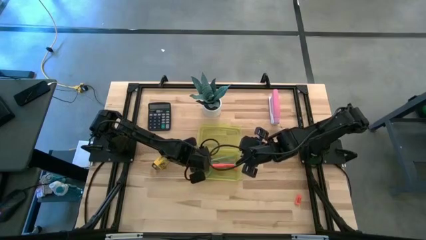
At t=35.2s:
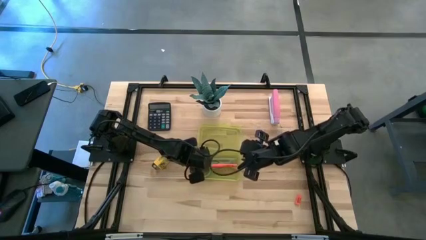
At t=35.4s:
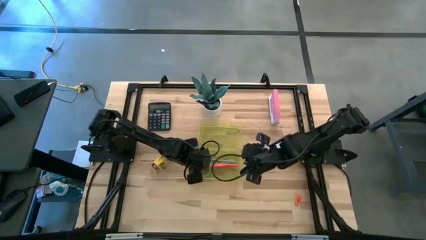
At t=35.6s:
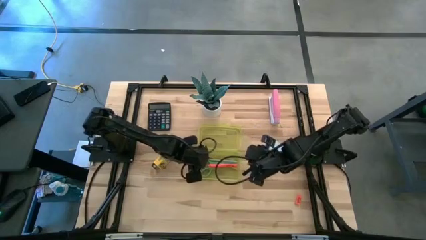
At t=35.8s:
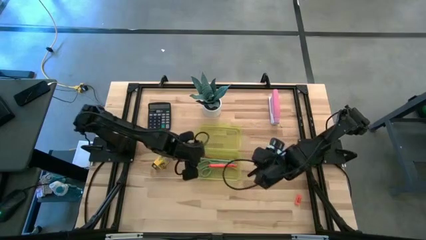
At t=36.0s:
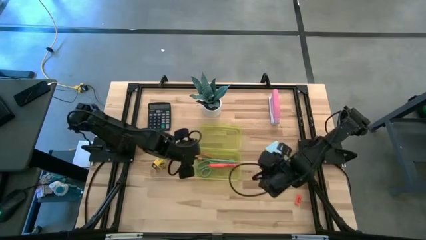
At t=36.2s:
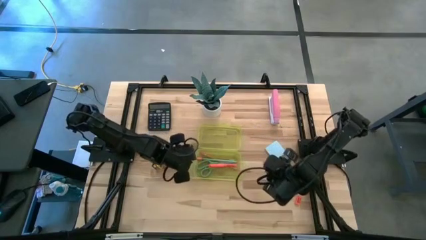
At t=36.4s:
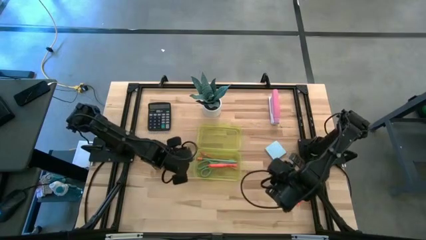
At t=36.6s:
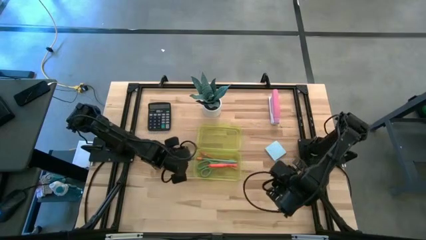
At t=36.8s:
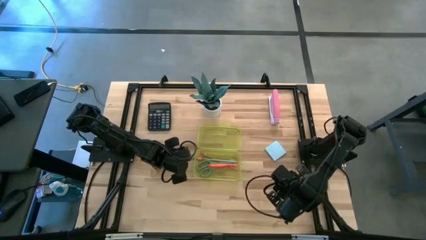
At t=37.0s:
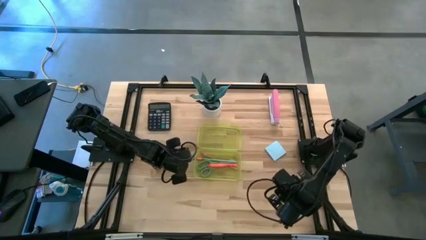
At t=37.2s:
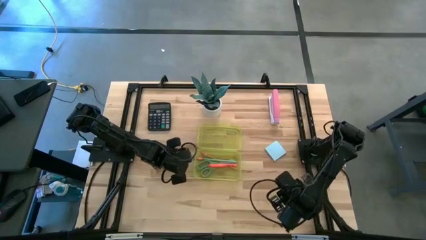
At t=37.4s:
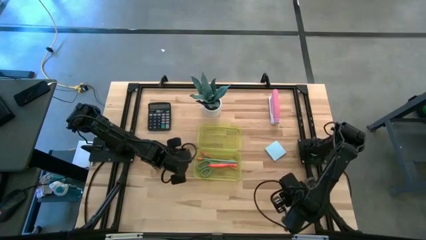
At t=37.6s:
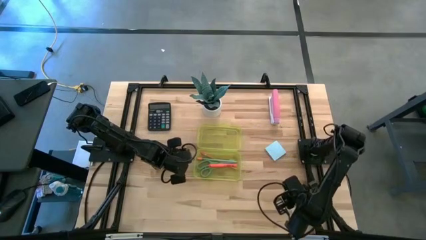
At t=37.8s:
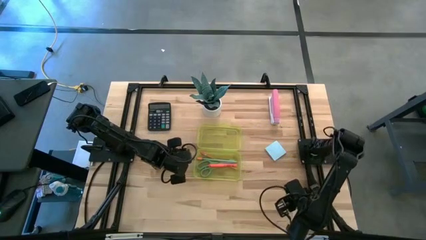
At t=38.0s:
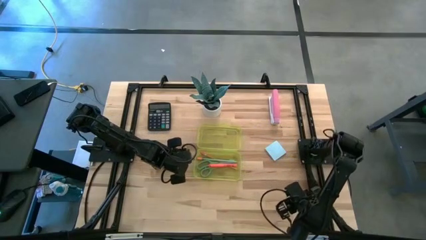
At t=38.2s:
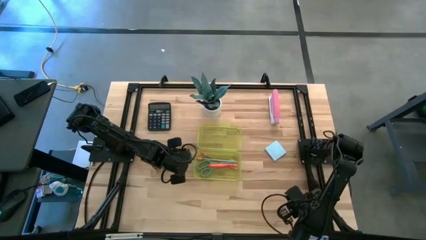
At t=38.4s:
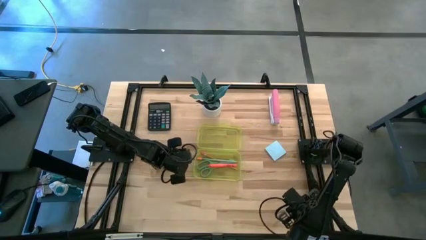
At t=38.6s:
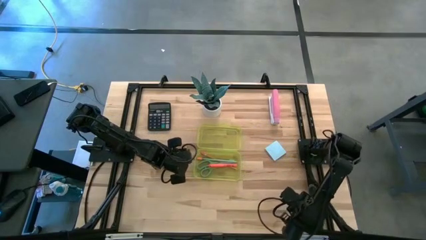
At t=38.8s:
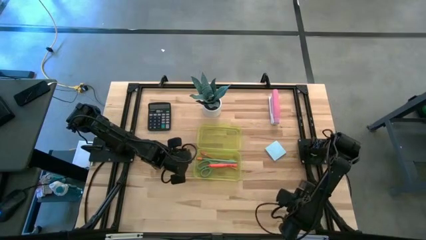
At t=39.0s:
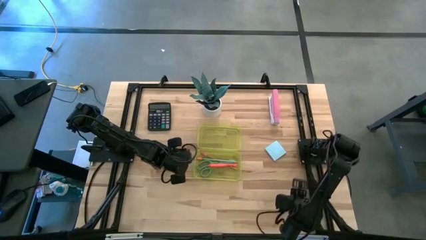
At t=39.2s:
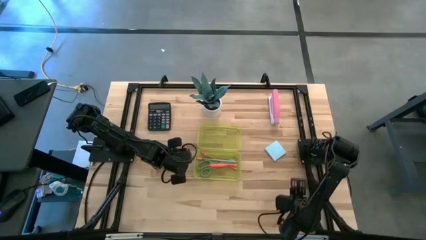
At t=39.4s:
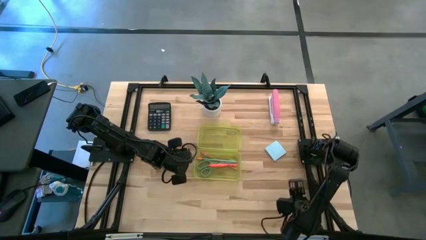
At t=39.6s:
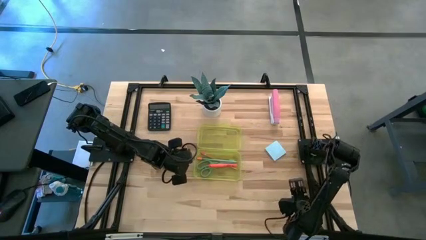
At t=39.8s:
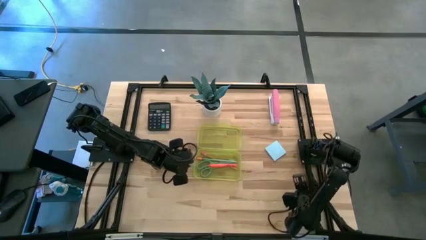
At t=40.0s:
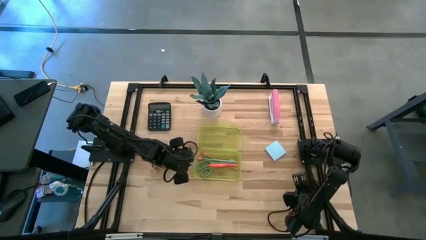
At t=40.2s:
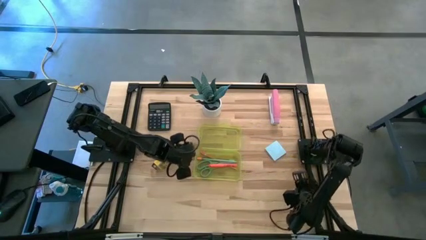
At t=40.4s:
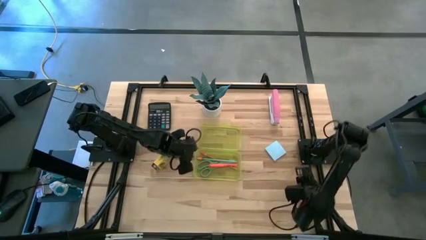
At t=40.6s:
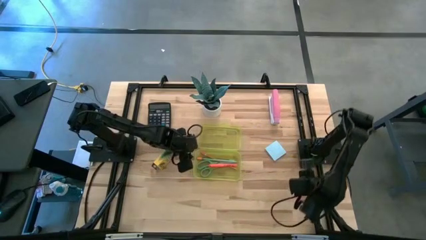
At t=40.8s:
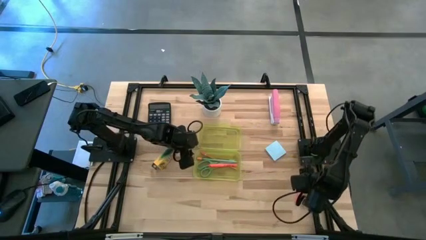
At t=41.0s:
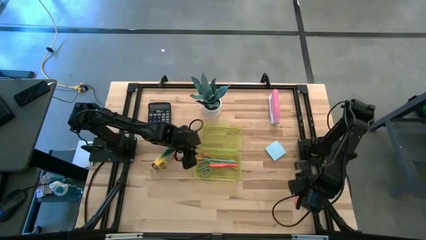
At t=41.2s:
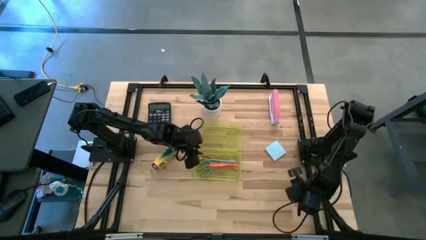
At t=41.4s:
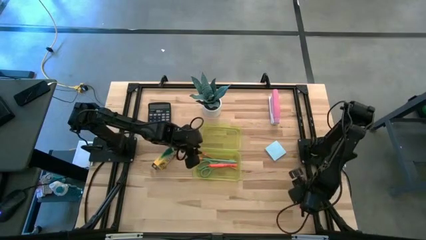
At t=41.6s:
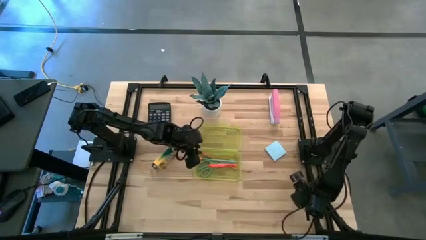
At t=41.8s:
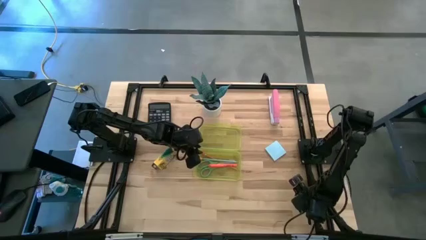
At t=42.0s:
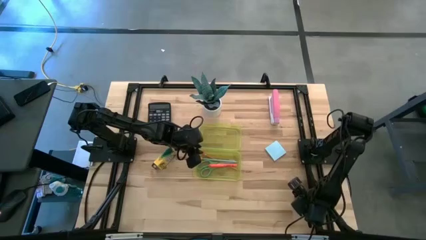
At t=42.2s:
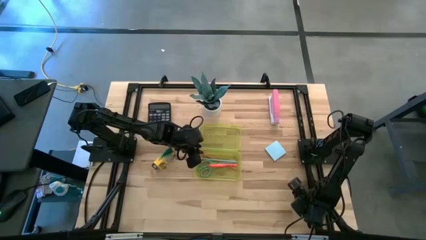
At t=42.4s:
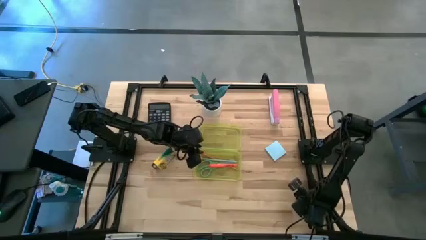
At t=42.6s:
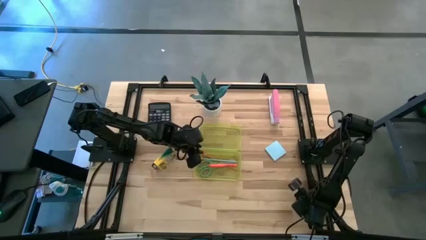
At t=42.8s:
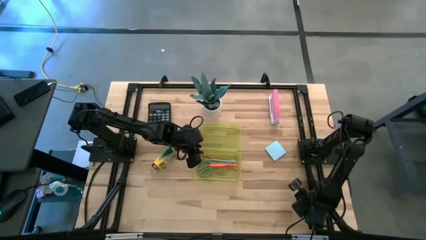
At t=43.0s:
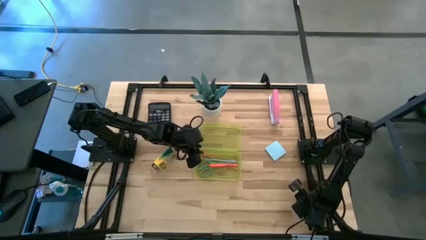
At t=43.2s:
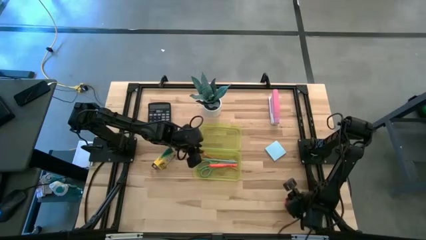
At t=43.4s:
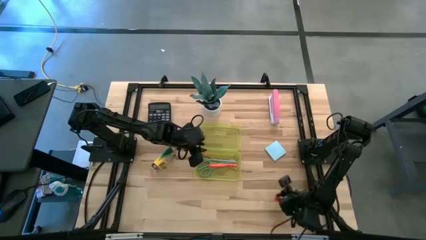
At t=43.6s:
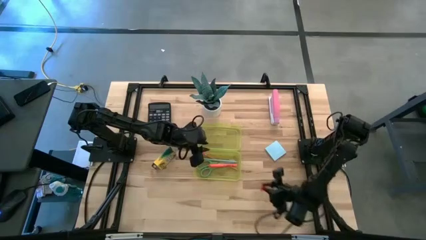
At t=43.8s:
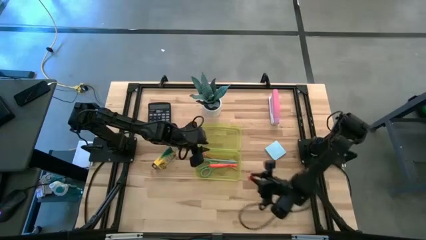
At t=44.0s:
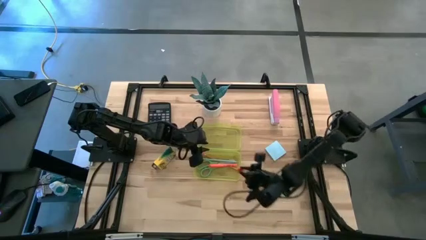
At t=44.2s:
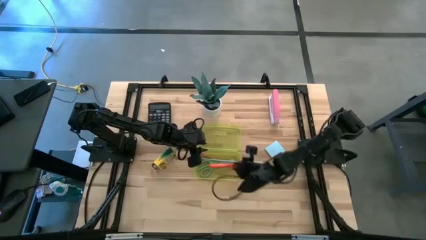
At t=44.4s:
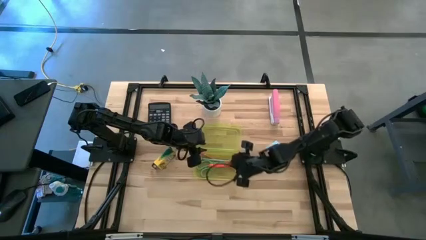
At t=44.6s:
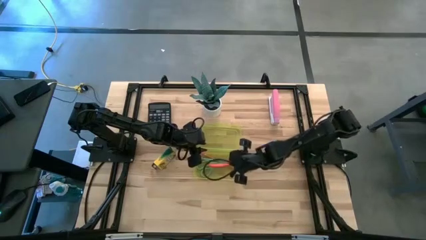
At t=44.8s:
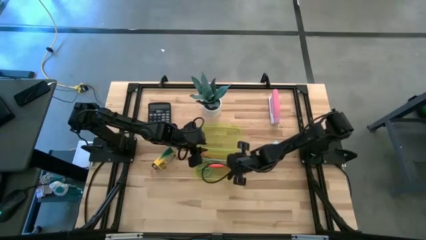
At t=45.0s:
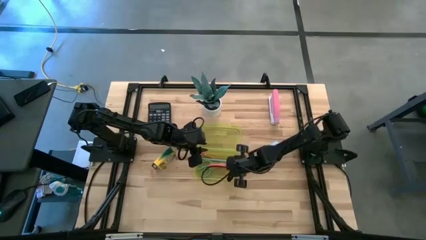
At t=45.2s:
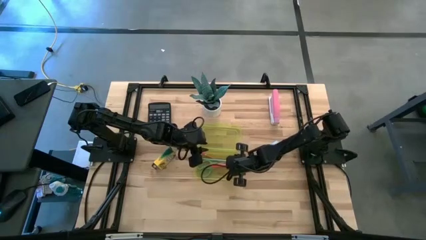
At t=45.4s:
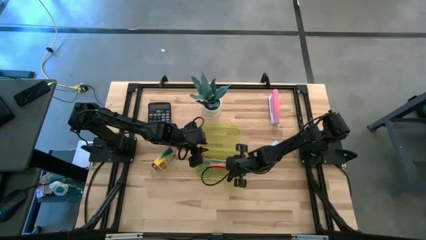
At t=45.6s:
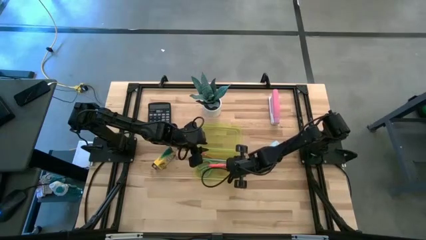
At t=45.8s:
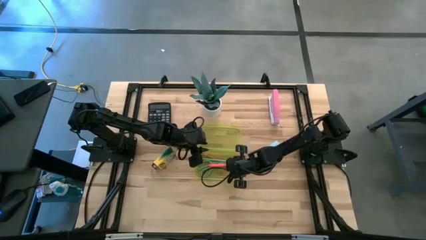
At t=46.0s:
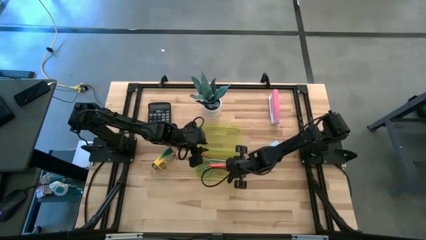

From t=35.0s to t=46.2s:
Task: Pack school essentials
Put the eraser into the yellow box

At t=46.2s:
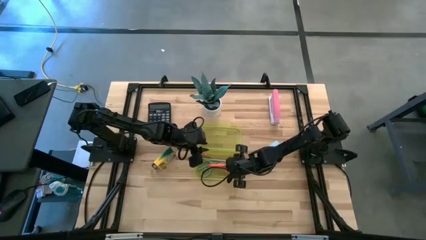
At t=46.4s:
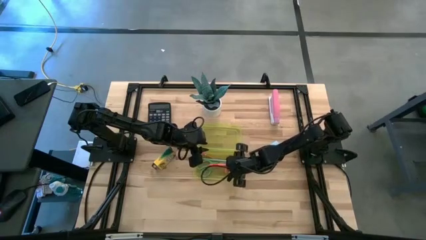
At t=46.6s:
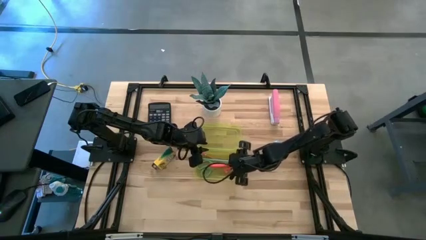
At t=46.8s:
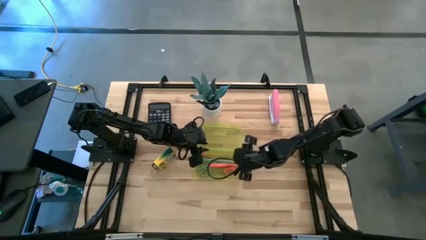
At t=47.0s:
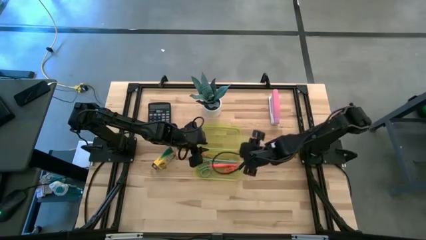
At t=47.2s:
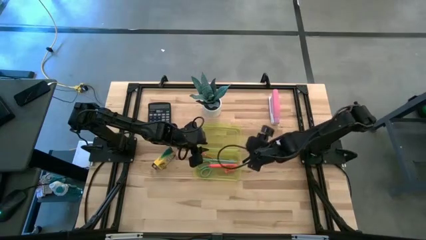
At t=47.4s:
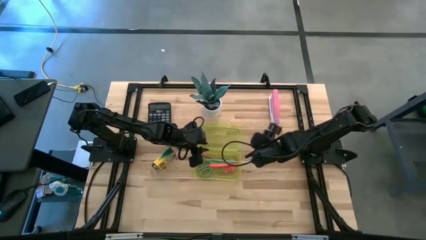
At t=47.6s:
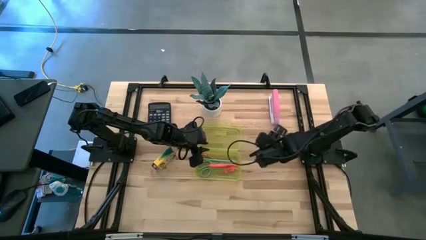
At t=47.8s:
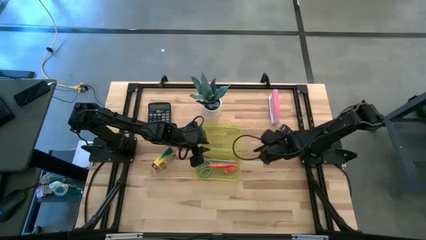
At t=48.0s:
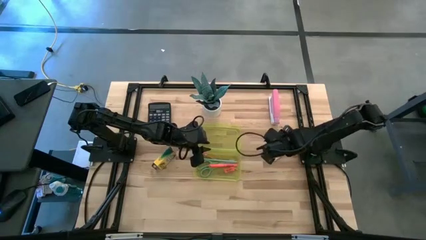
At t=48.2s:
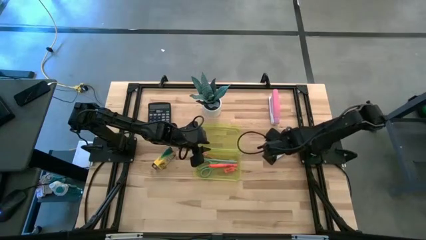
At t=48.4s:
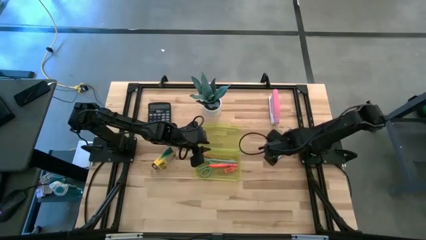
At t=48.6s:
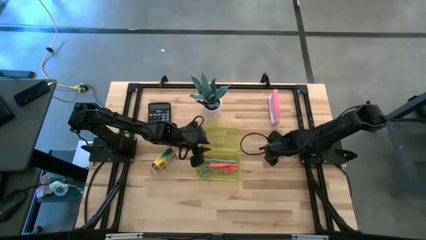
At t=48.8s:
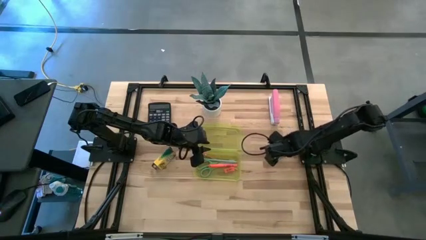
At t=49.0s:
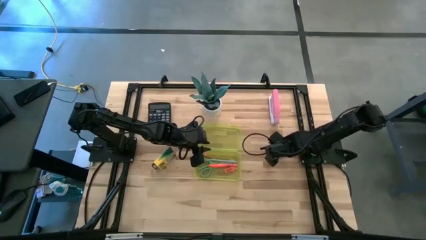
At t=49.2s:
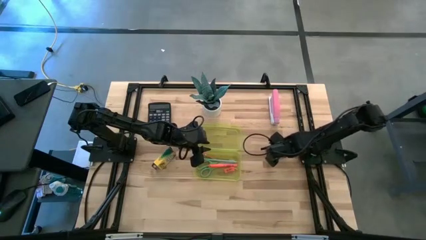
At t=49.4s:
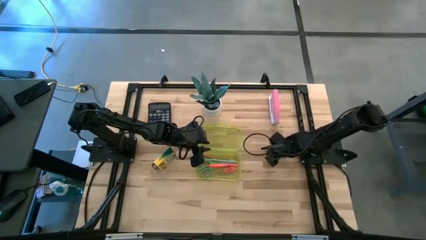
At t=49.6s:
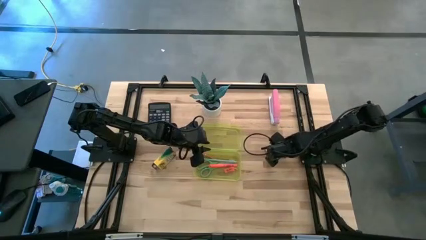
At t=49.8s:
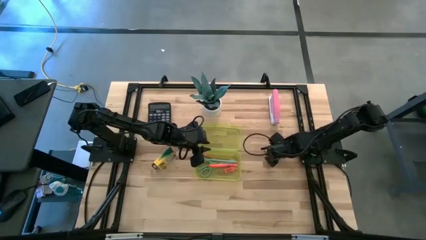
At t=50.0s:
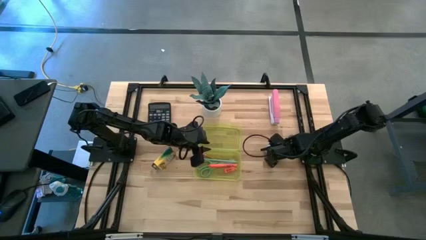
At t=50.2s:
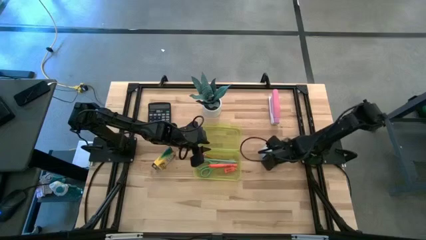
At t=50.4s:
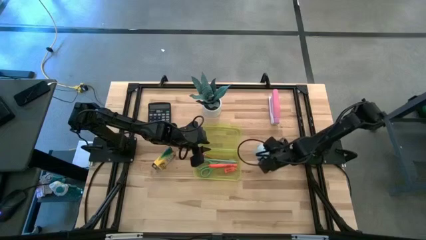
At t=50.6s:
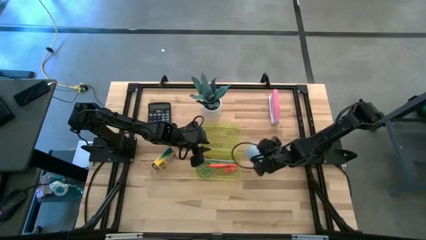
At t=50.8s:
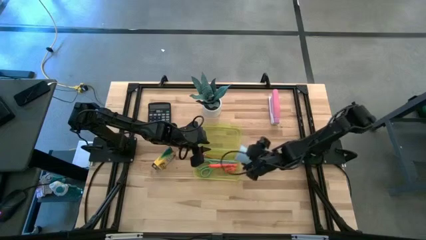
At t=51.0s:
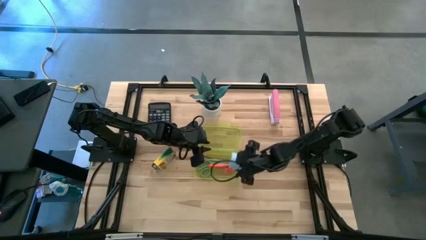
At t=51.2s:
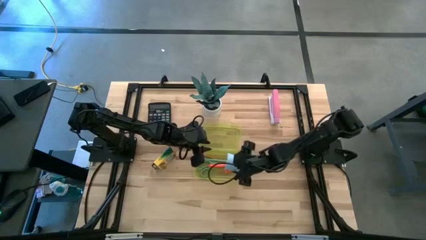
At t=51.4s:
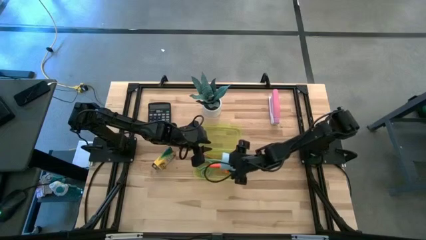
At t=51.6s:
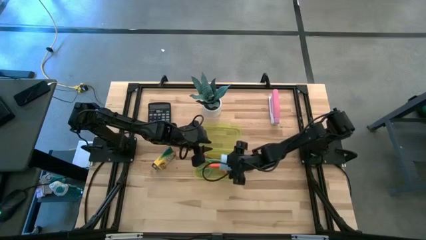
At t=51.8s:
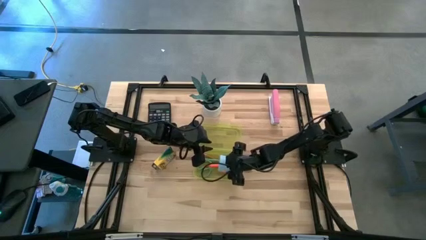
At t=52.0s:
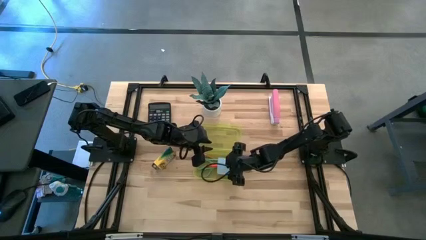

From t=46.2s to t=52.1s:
Put the sticky notes into the yellow box
